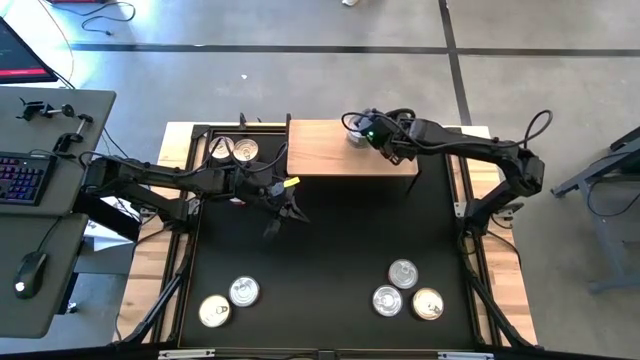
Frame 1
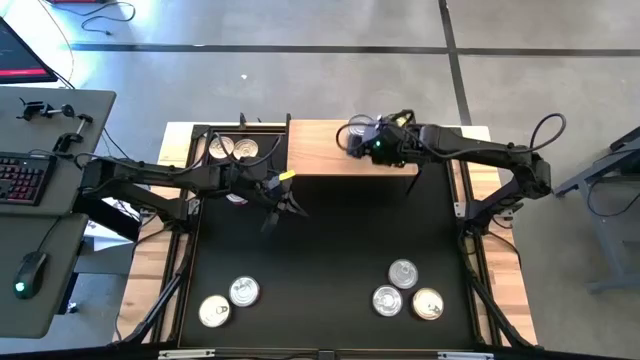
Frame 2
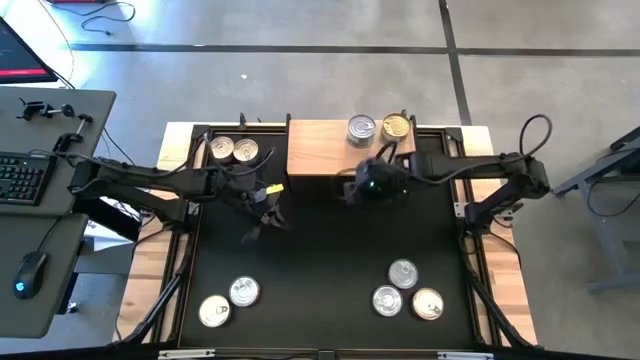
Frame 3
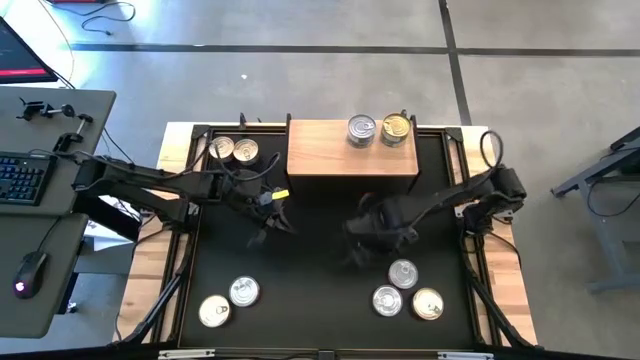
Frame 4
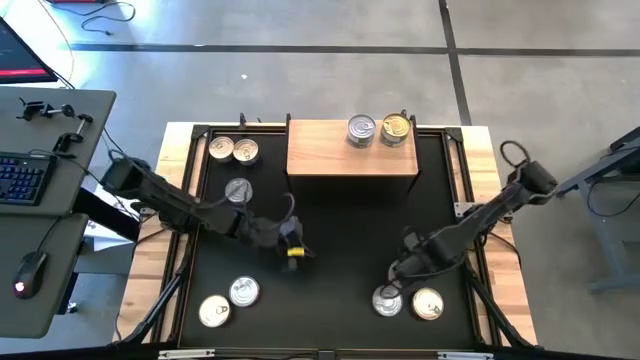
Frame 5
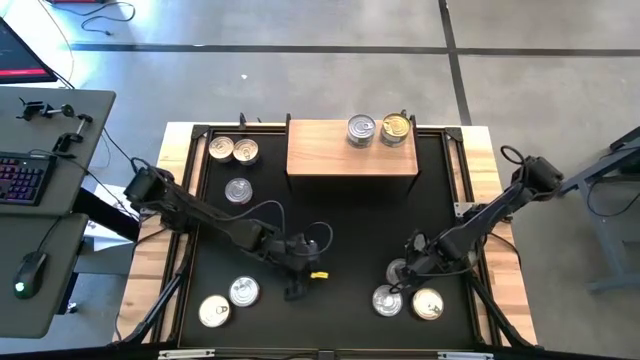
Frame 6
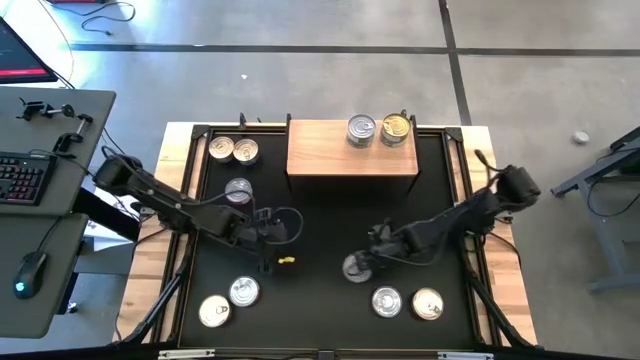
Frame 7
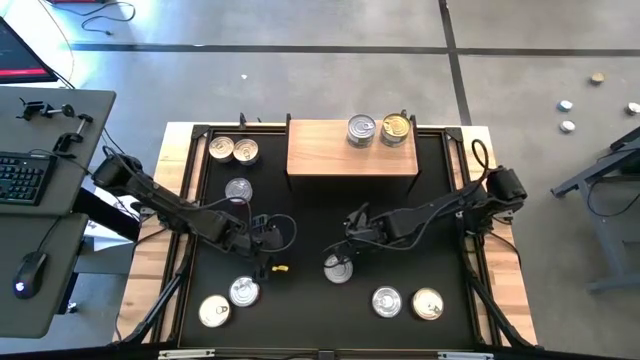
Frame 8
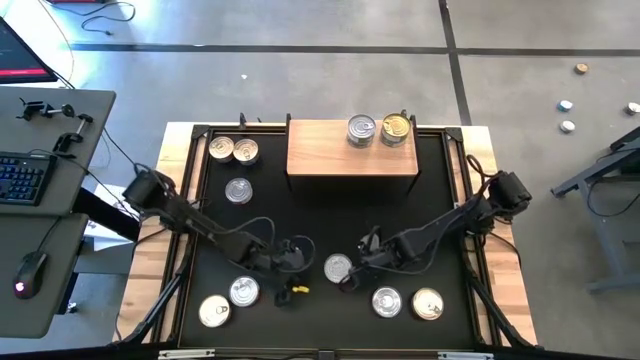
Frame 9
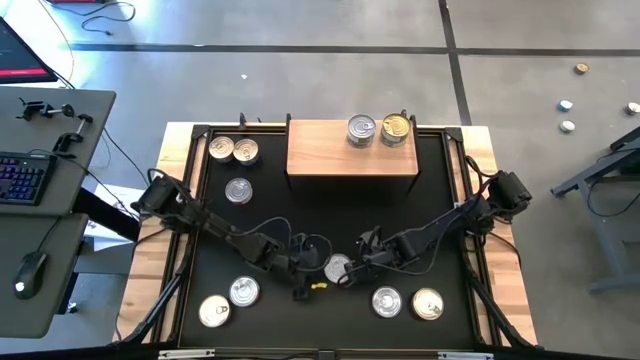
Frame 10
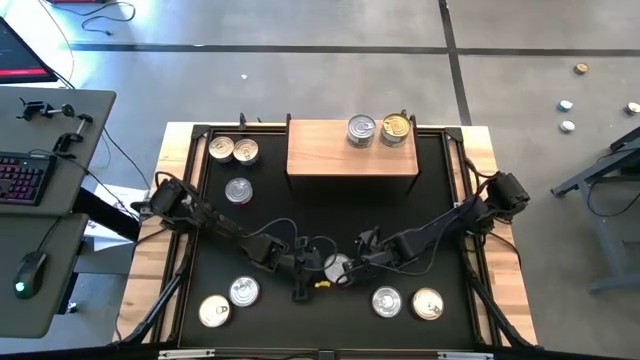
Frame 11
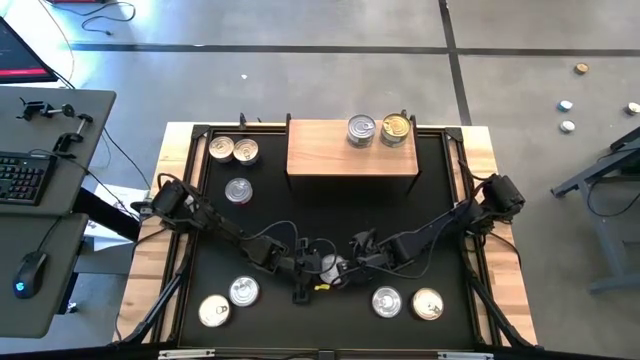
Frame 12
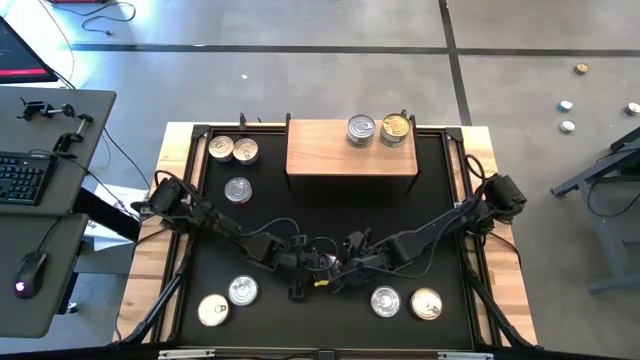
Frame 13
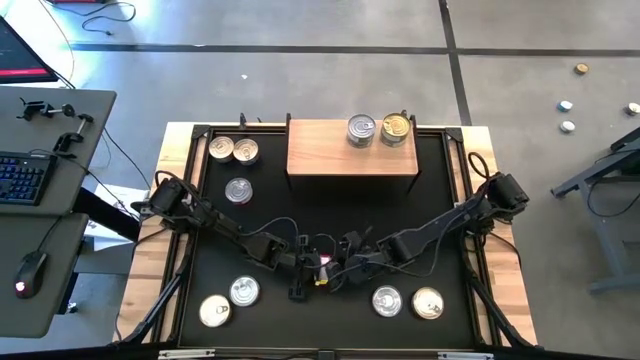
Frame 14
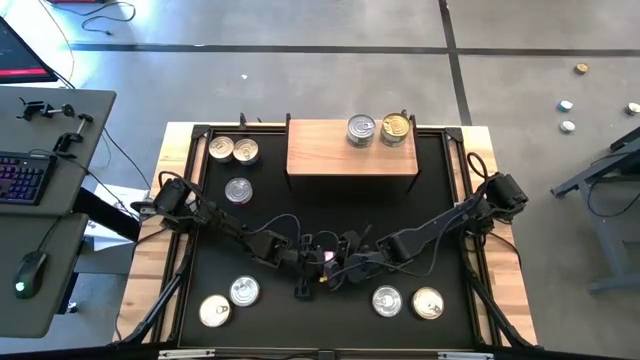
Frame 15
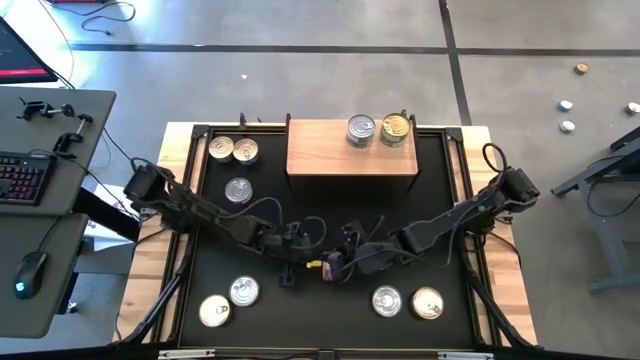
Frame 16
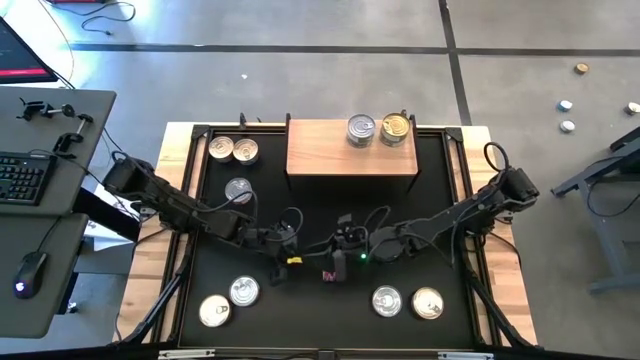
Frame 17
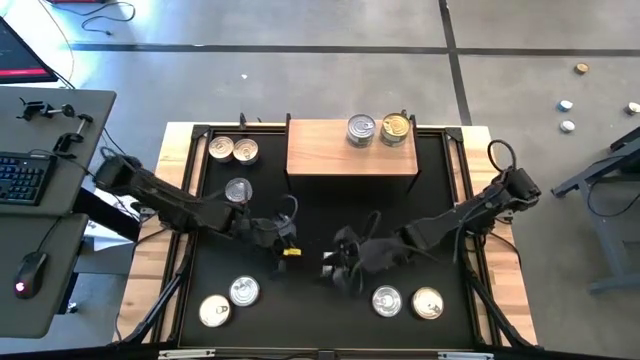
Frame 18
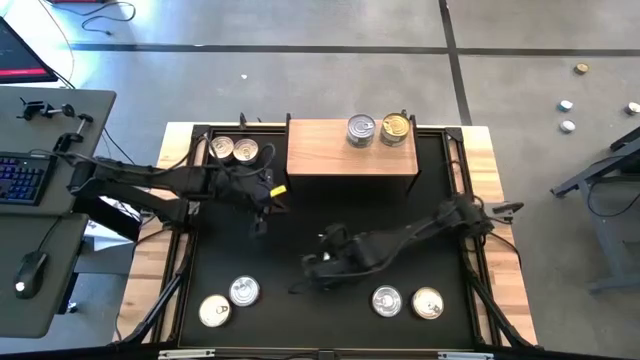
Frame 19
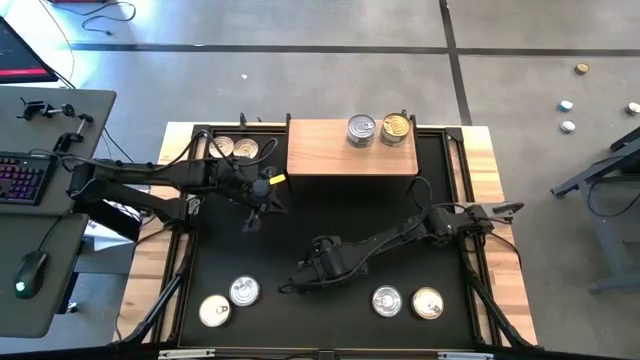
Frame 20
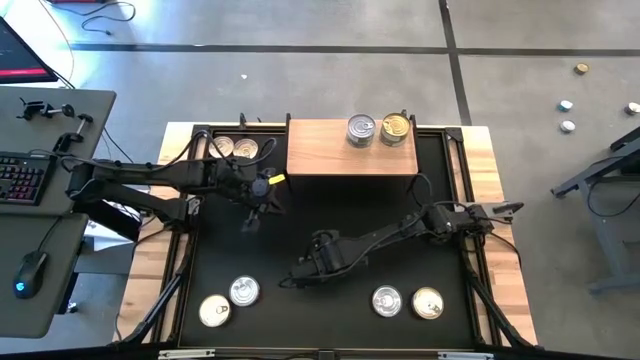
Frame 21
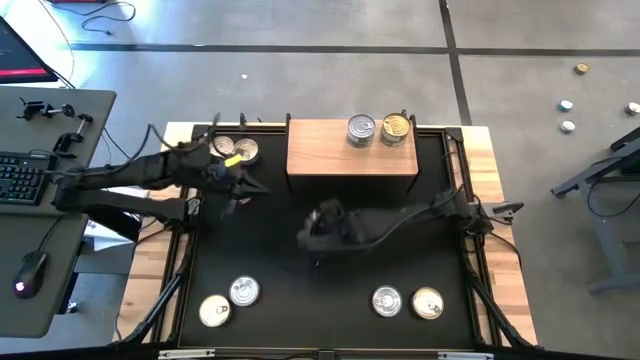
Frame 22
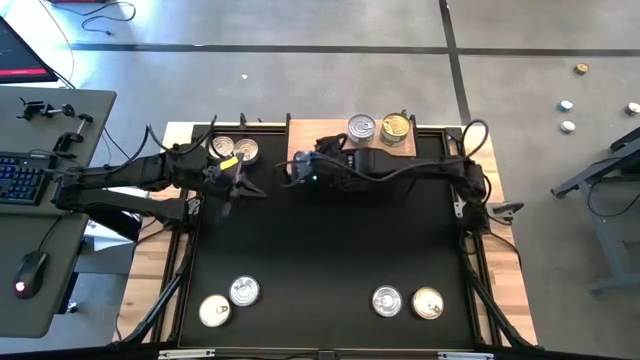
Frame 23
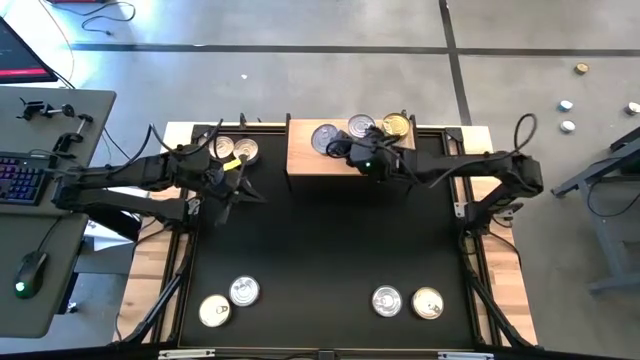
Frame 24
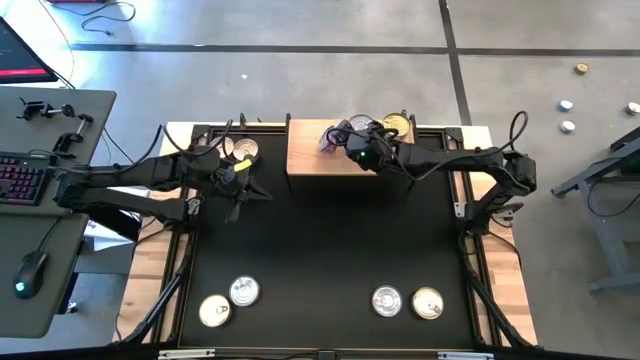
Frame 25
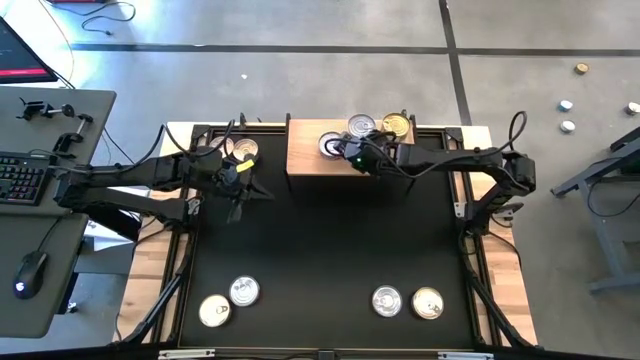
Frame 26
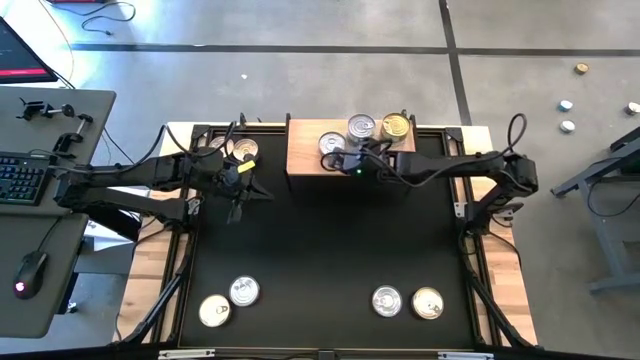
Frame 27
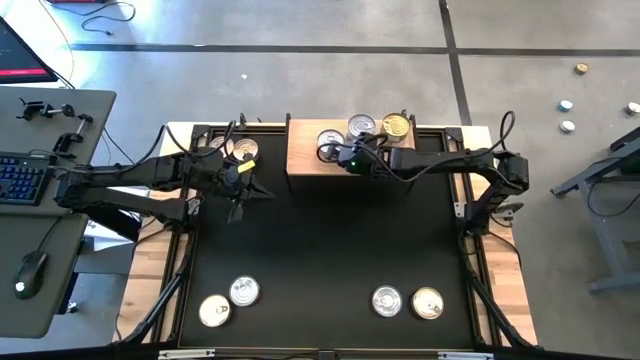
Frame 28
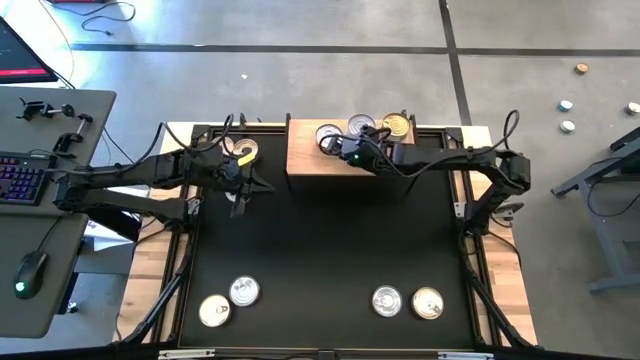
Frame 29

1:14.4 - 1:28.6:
Task: Stack canned seafood by type on shelf
Put the red tuna can on the shelf

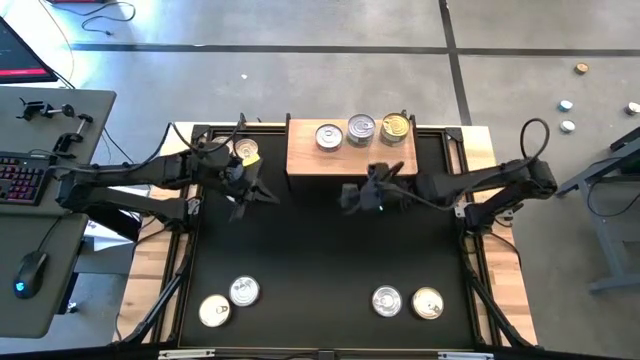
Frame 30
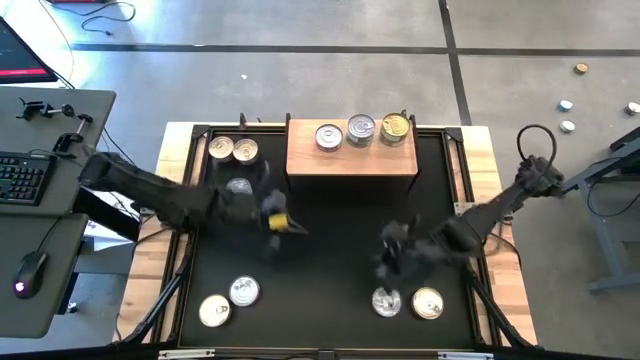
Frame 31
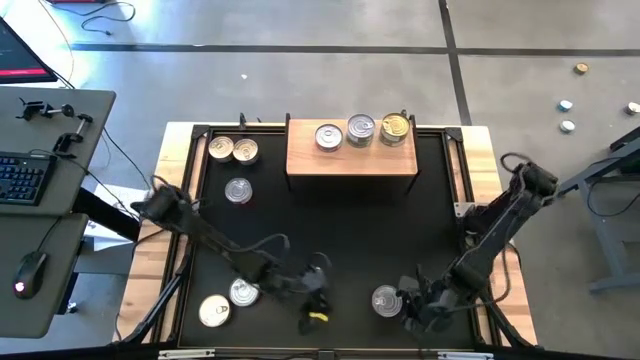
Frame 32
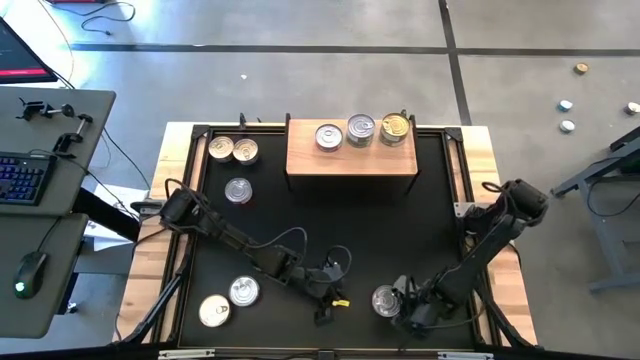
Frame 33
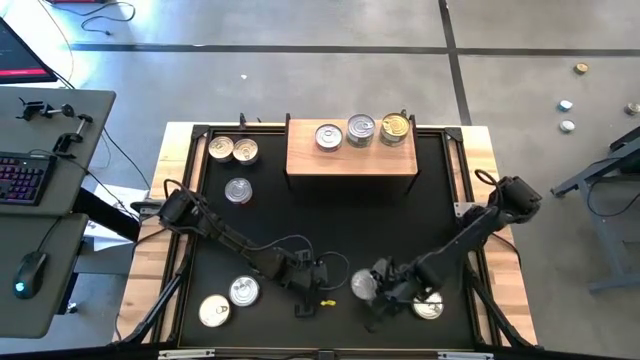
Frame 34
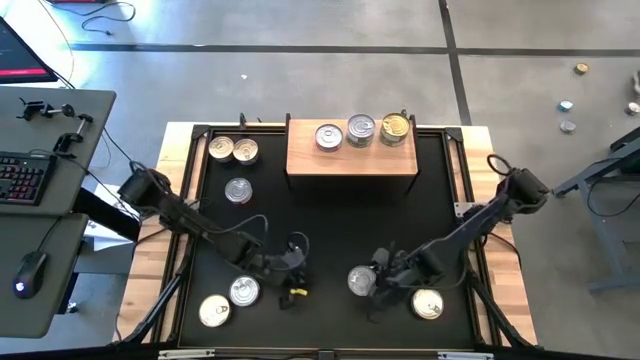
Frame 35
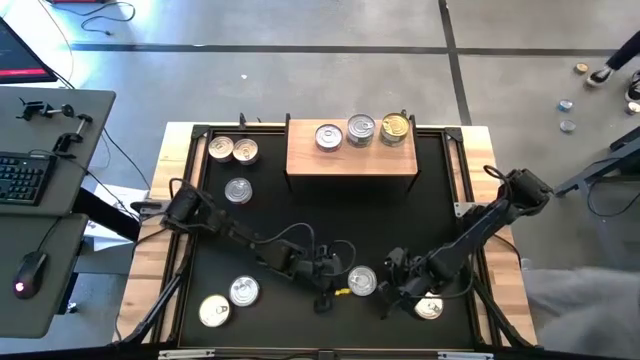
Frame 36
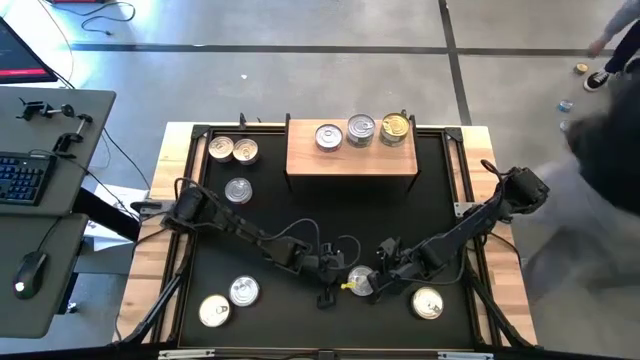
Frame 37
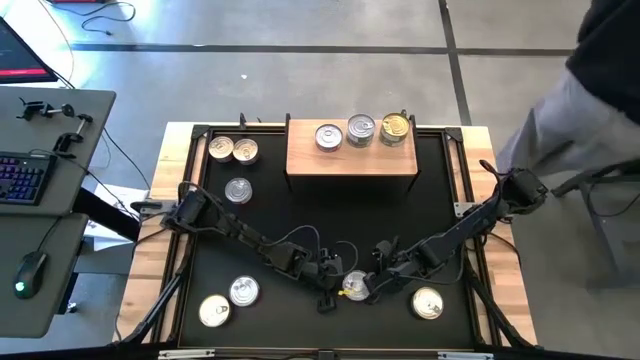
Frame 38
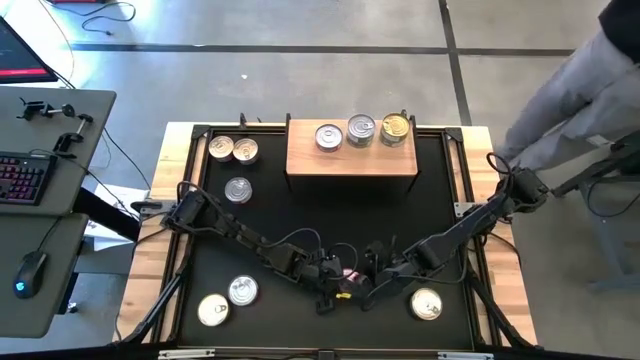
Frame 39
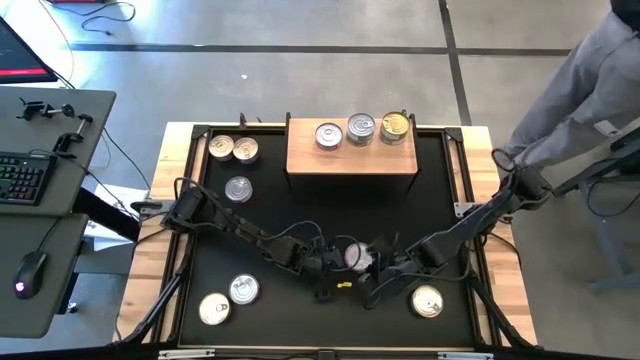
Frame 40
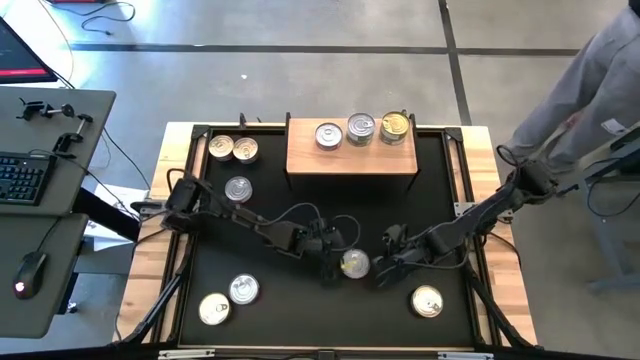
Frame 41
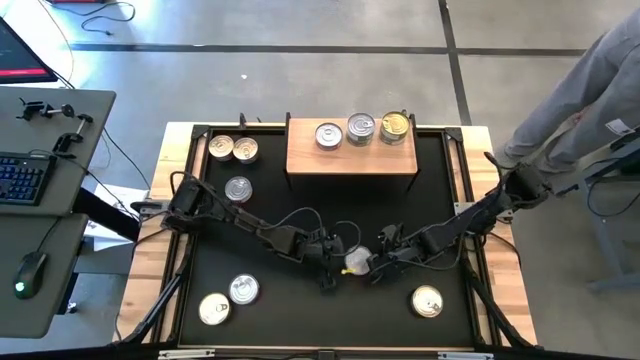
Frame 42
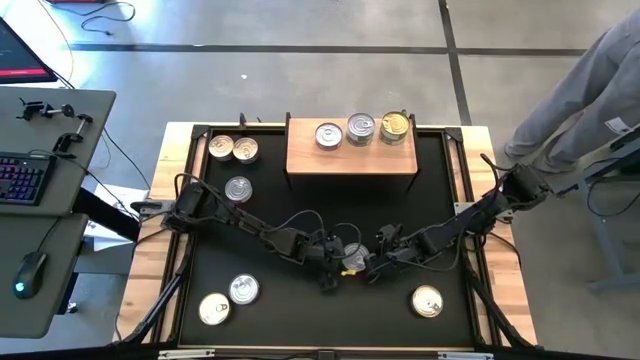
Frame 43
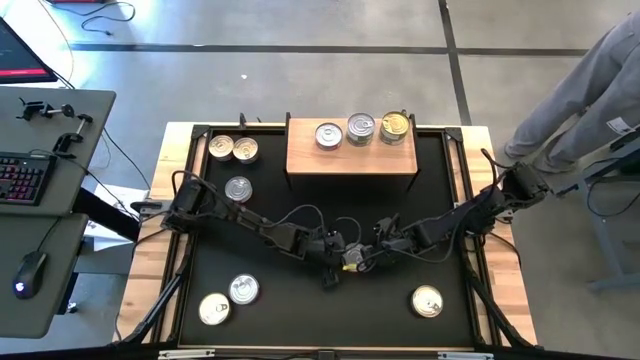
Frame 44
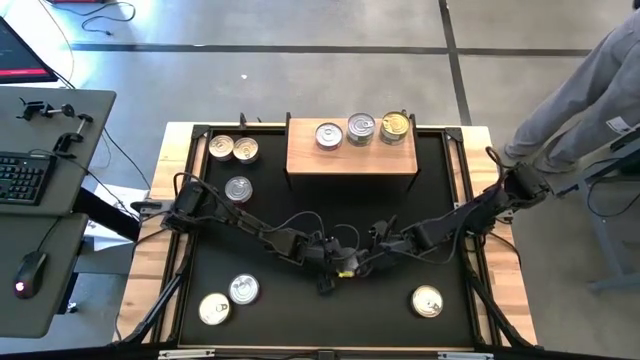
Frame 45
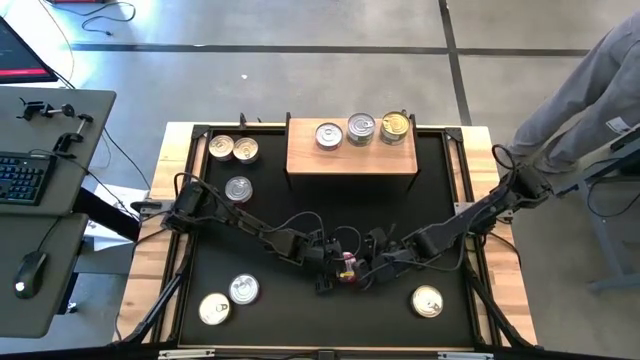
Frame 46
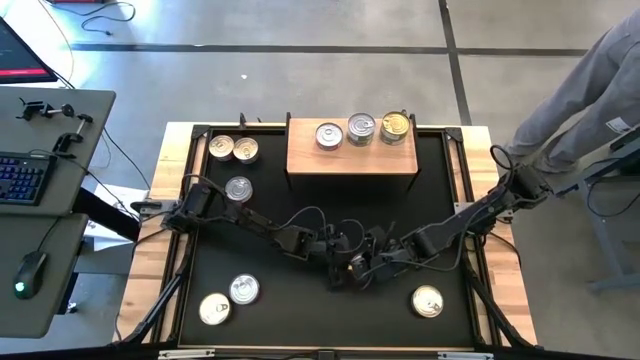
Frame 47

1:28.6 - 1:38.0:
Stack the red tuna can on top of the red tuna can on the shelf
